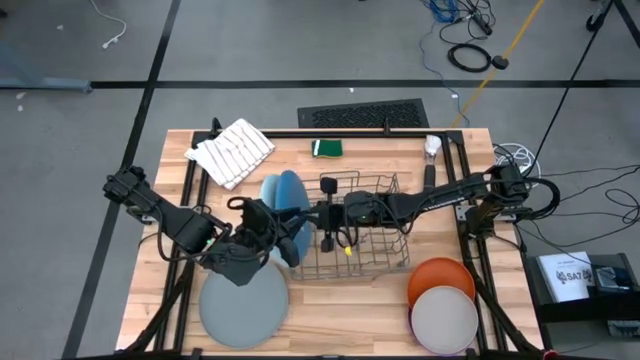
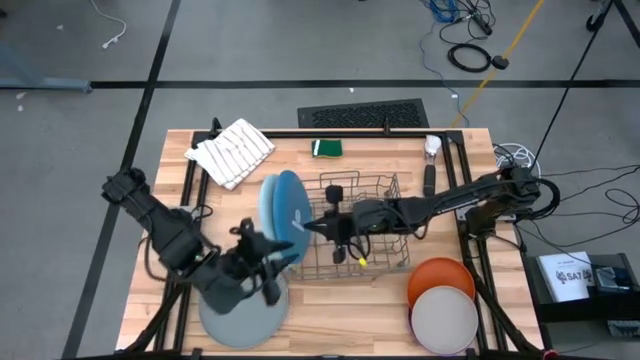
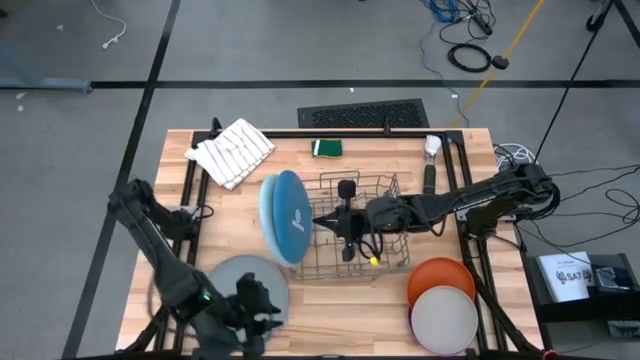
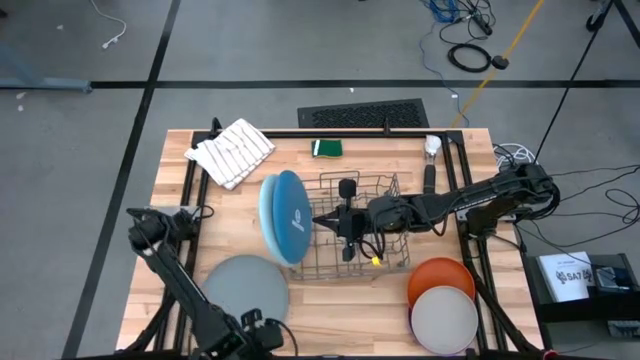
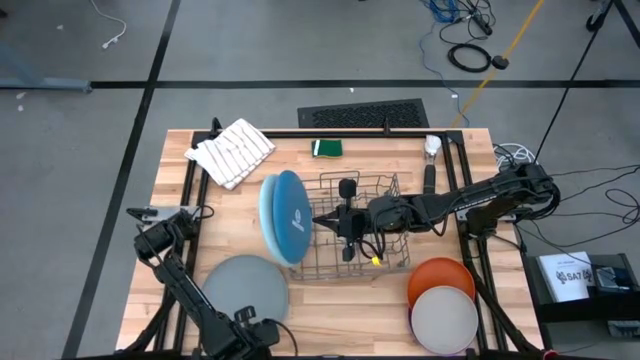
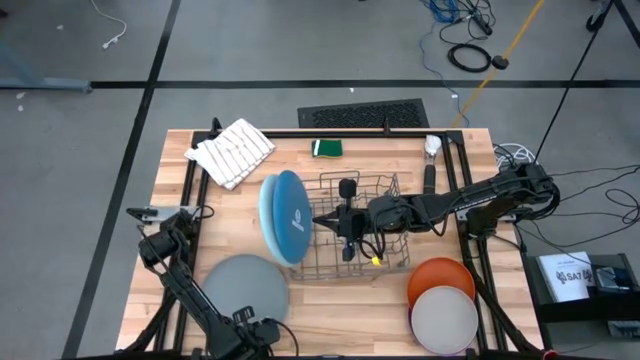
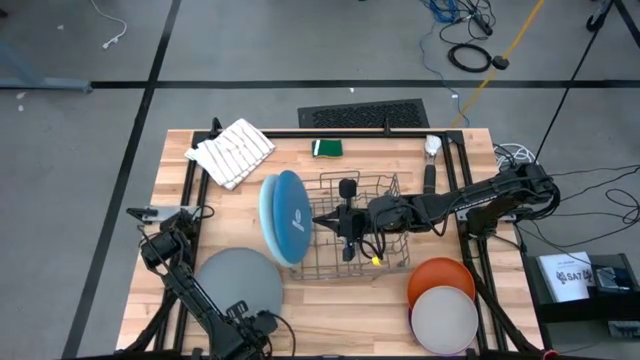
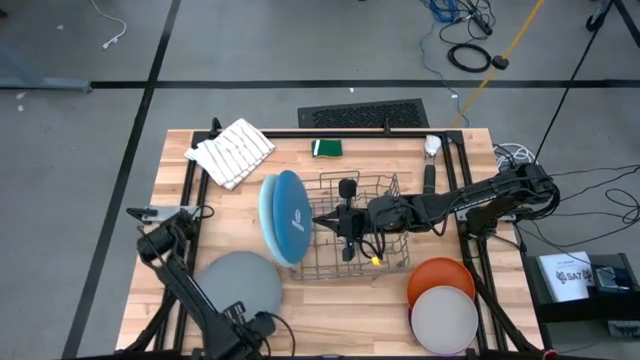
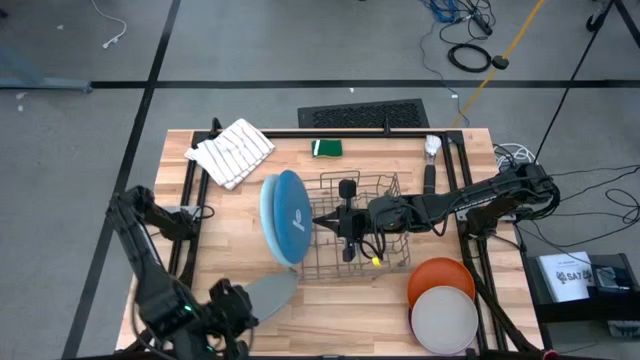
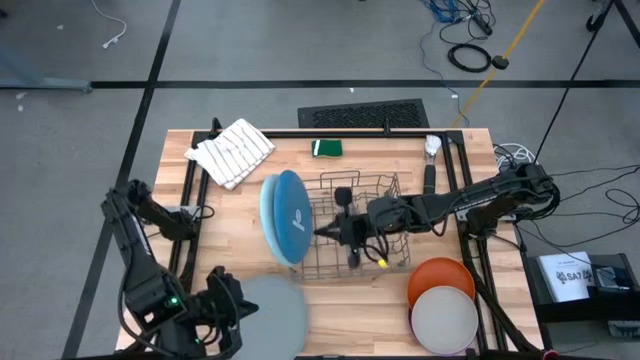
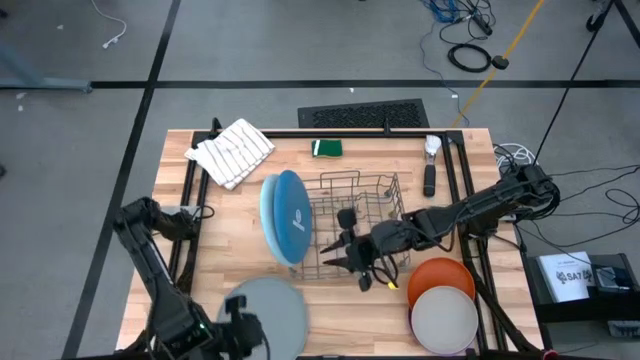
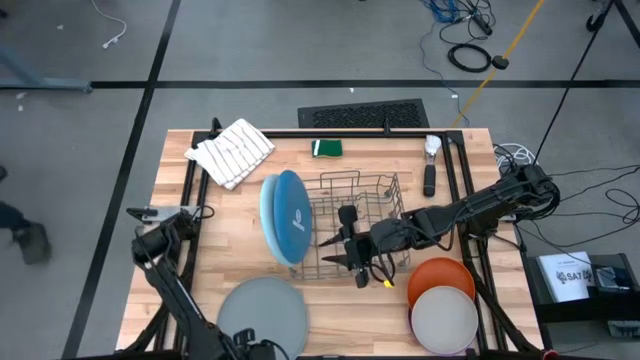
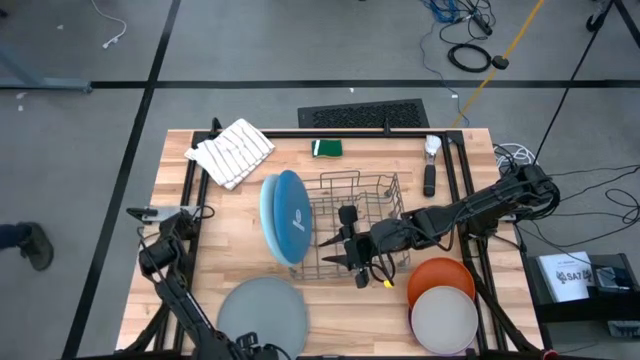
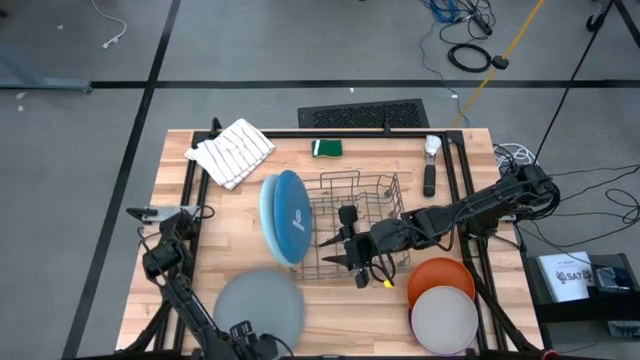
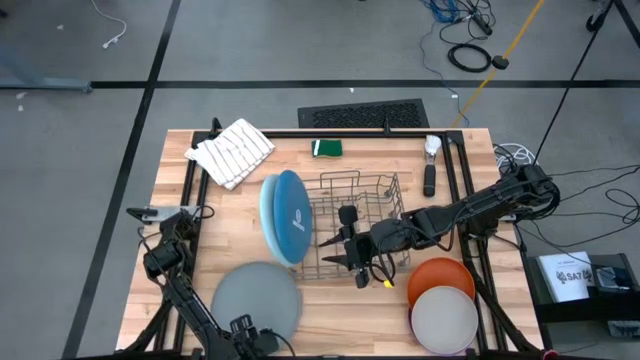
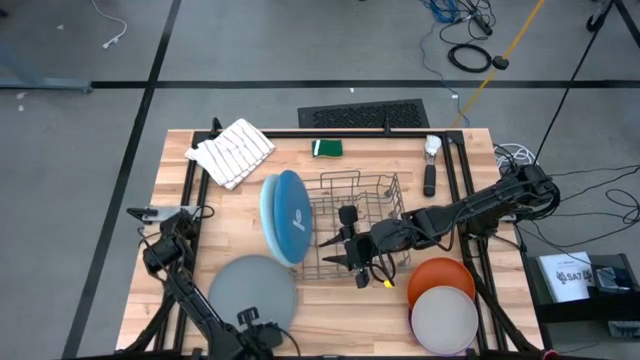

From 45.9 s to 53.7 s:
Task: Sort dishes
Put the gray plate into the dish rack

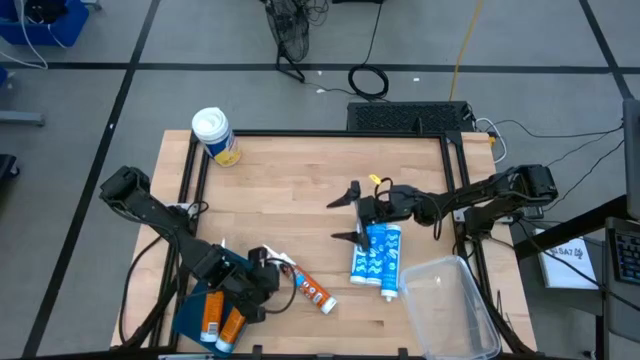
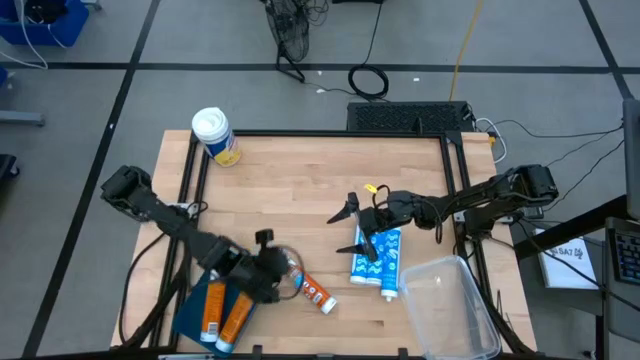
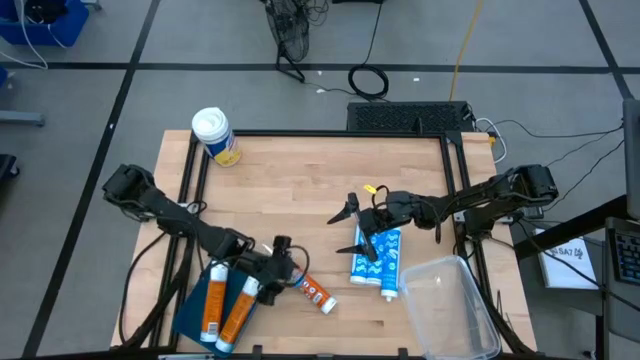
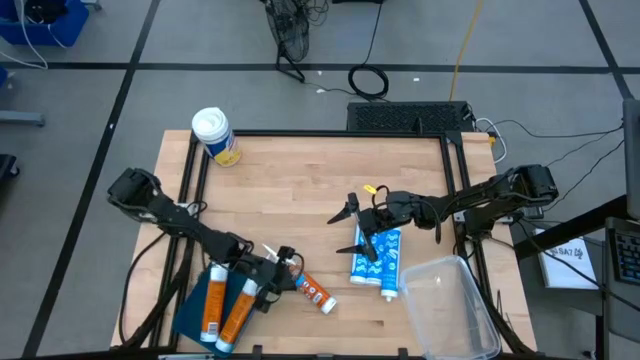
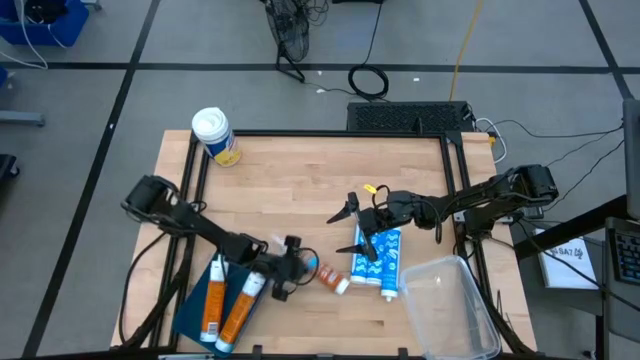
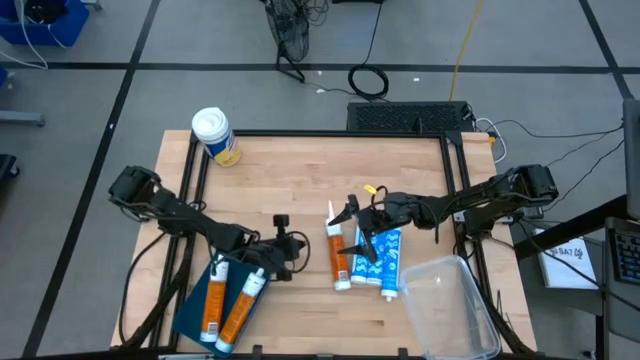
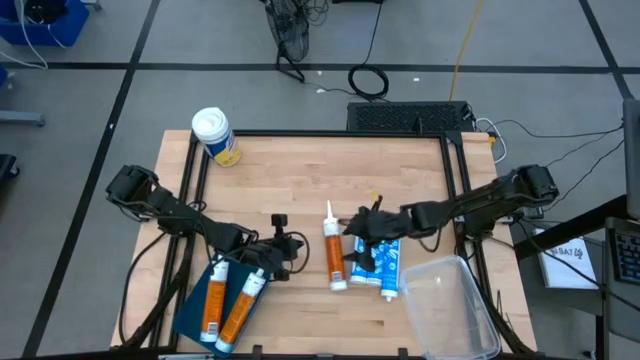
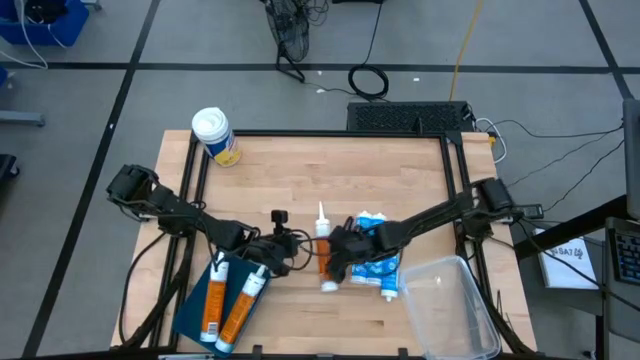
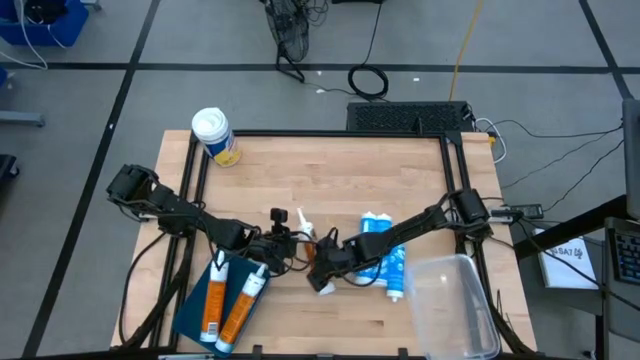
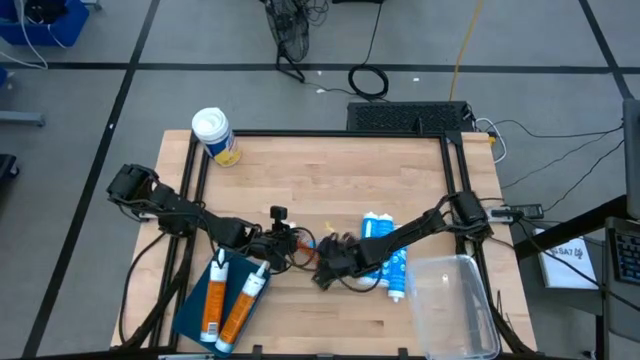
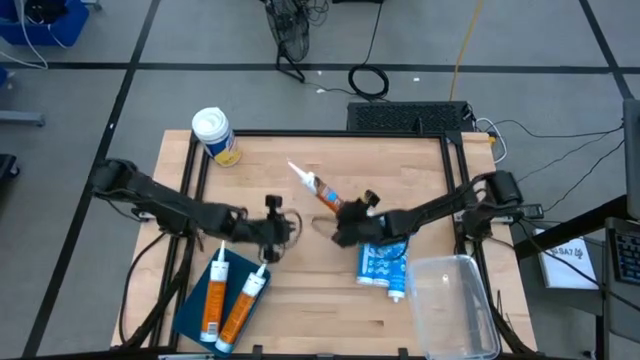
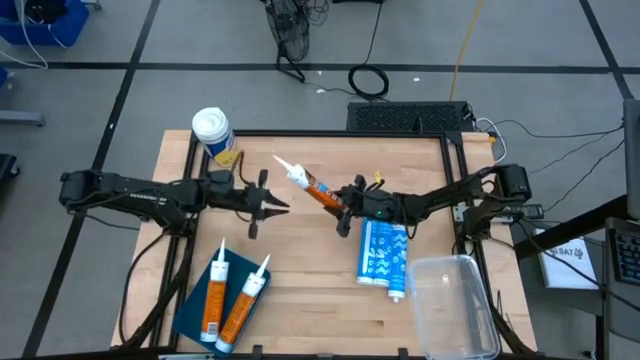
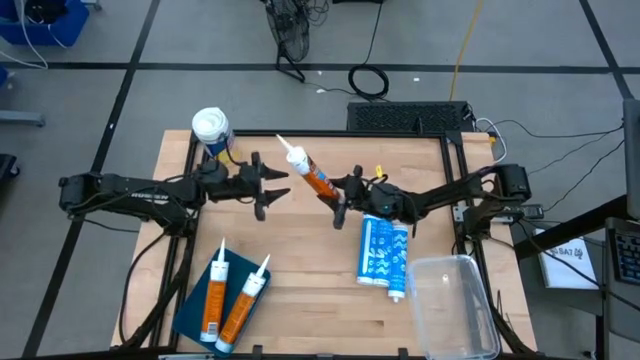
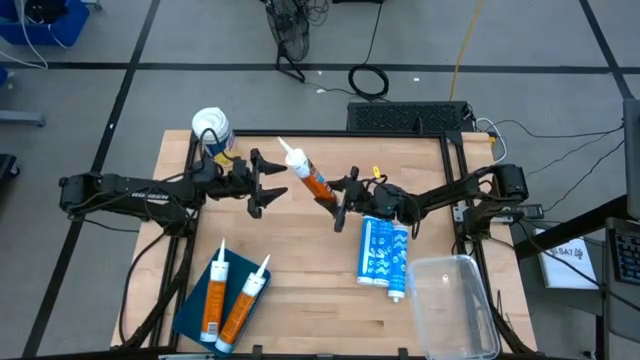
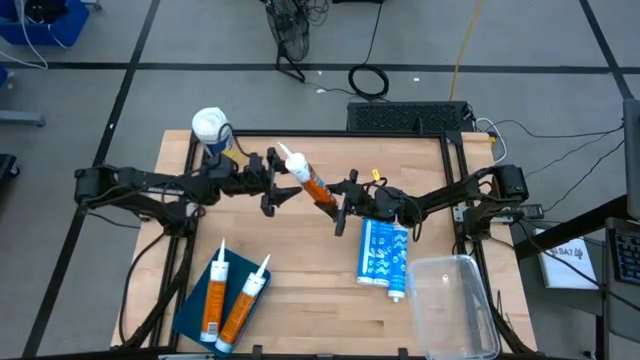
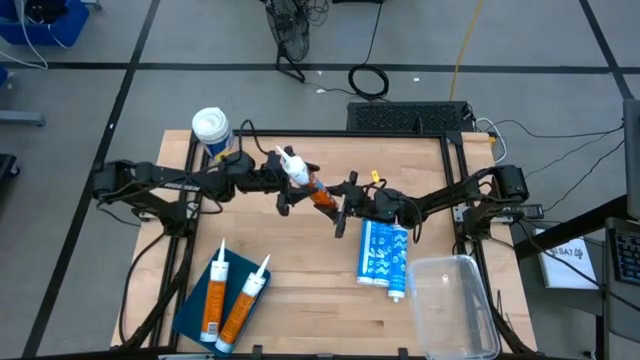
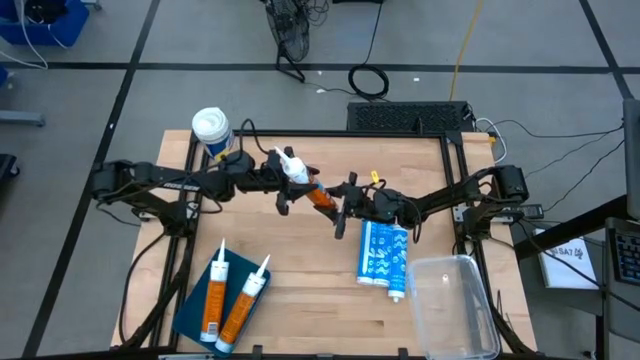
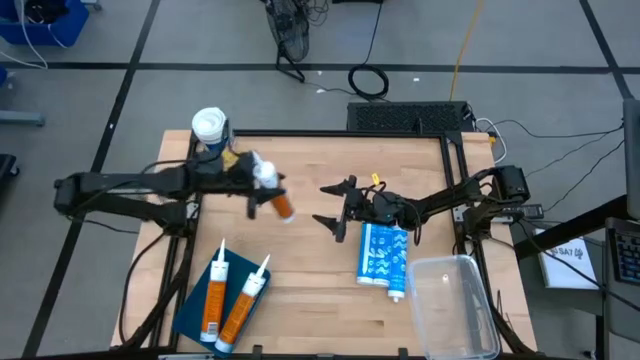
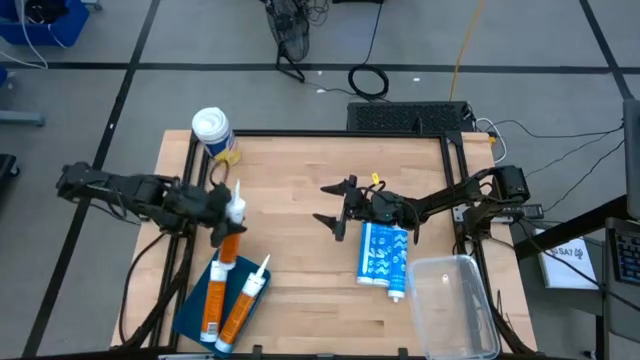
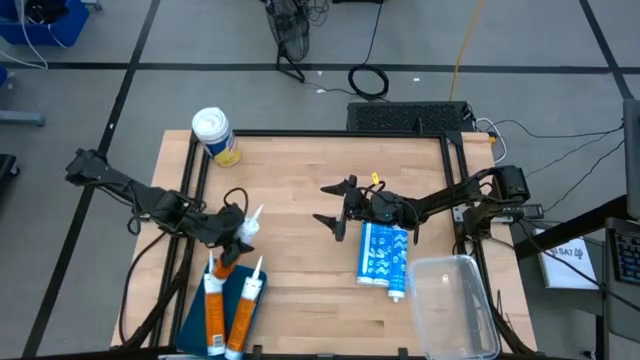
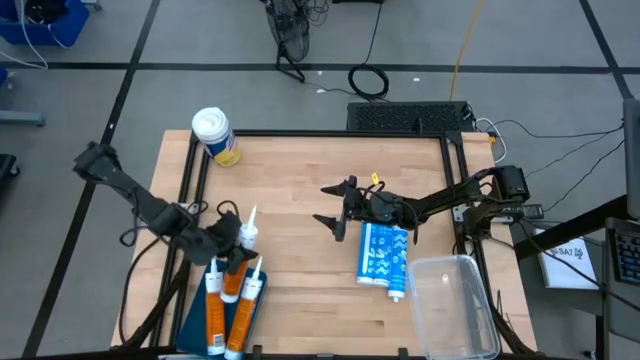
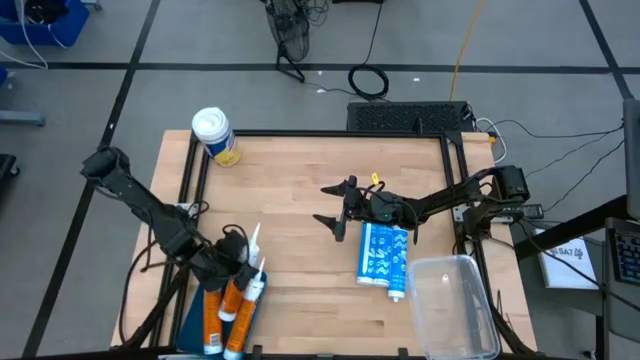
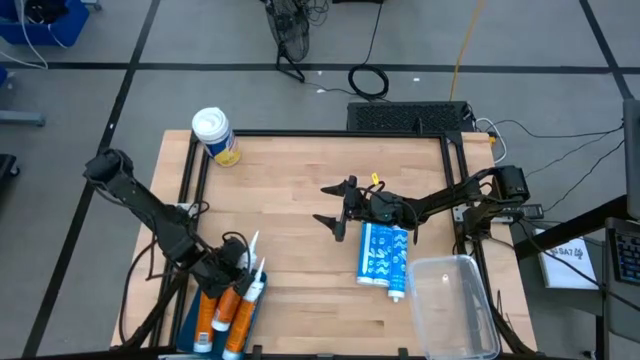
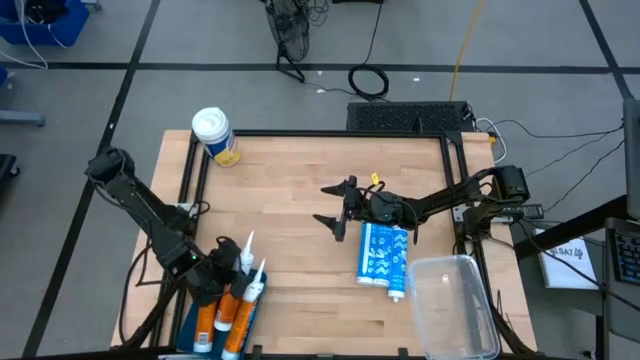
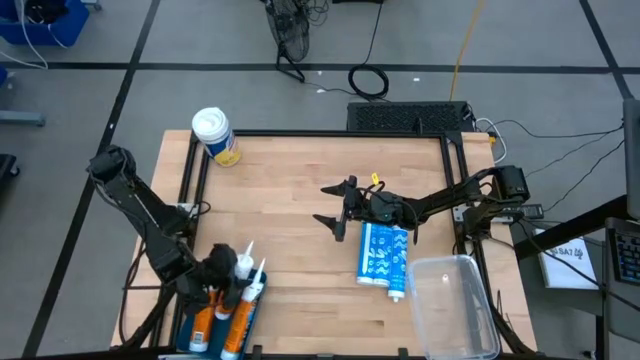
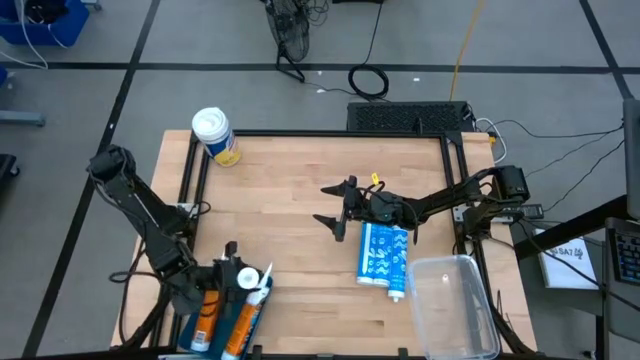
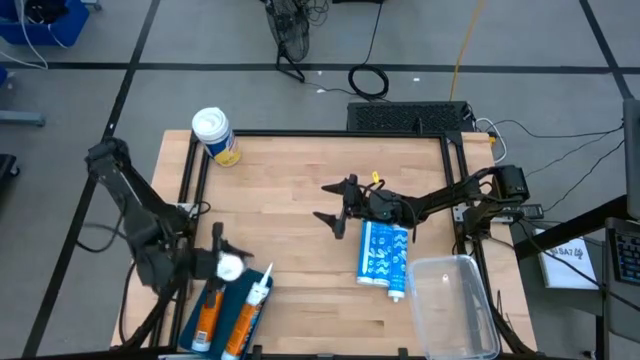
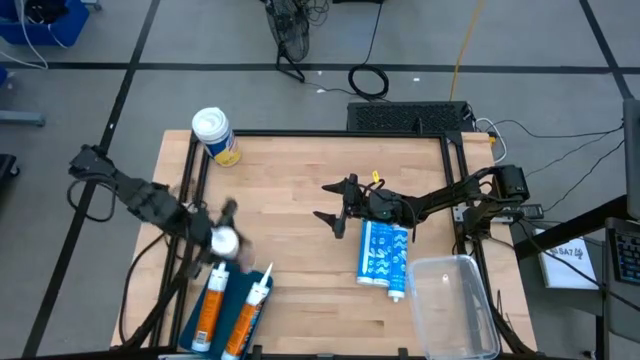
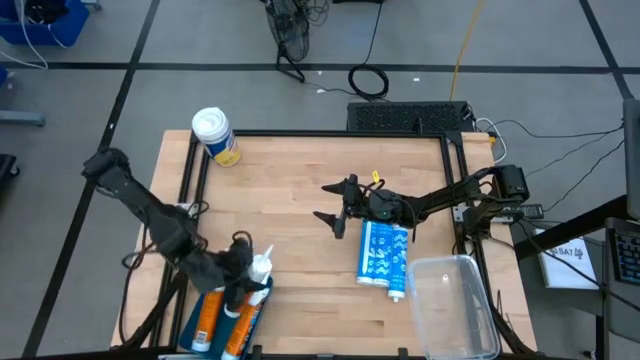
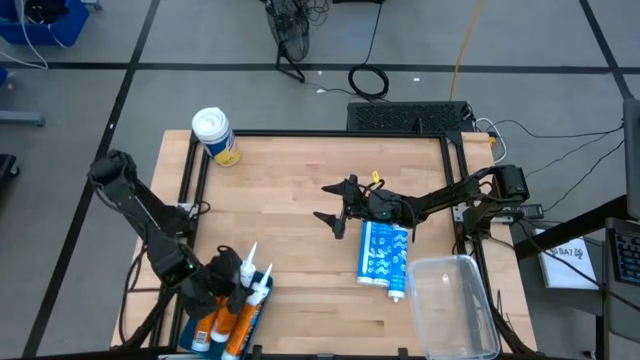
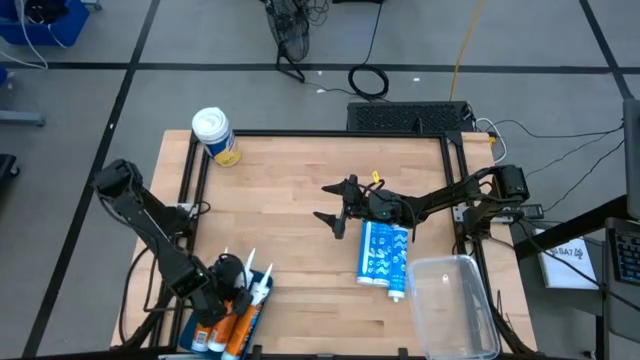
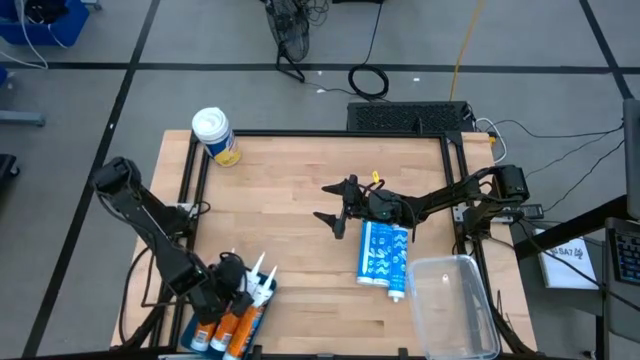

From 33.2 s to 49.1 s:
Task: Pick & place silicon tubes, Sealant and Lysol wipes
Put the orange sealant into the blue bin
